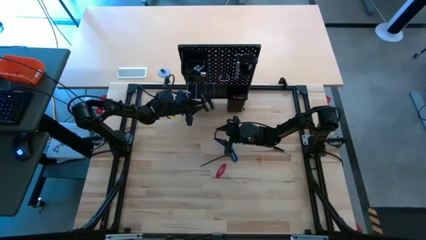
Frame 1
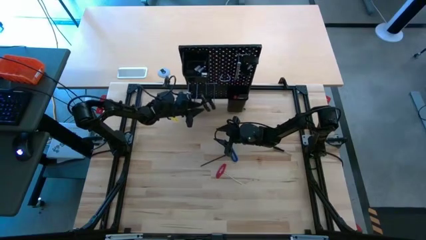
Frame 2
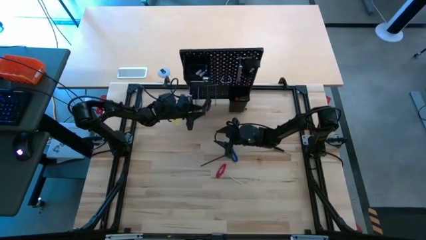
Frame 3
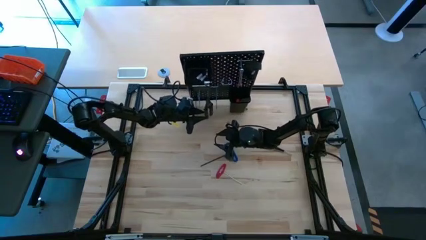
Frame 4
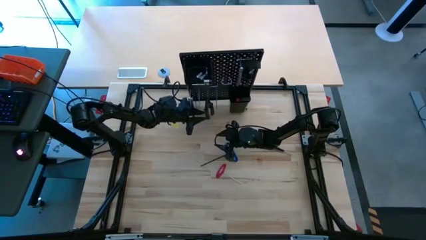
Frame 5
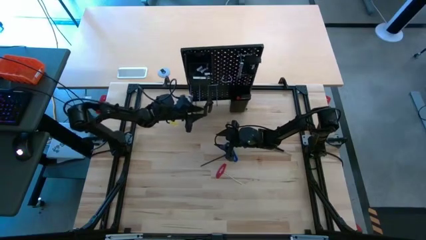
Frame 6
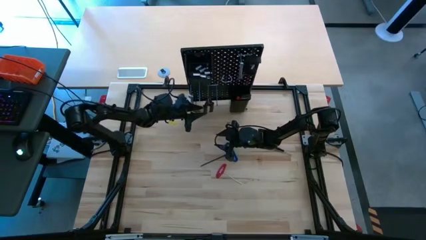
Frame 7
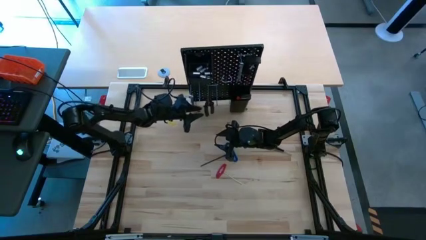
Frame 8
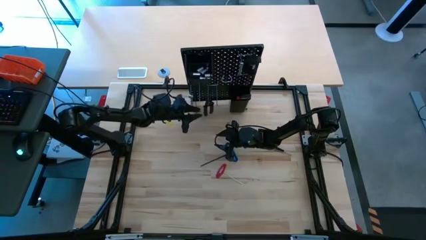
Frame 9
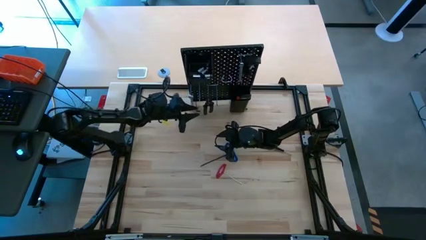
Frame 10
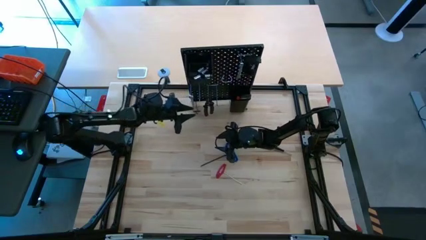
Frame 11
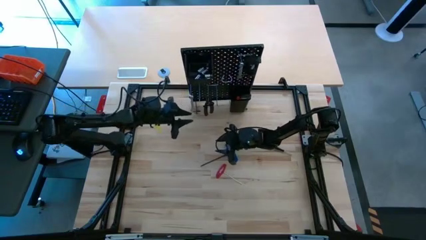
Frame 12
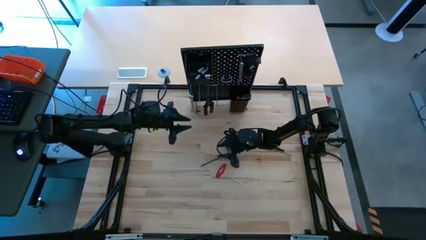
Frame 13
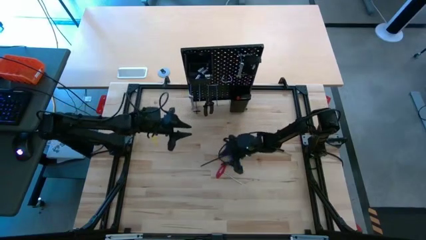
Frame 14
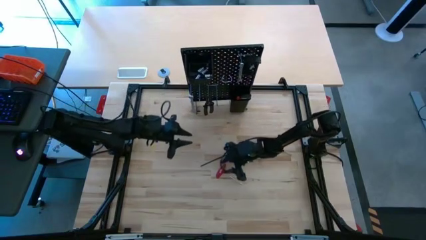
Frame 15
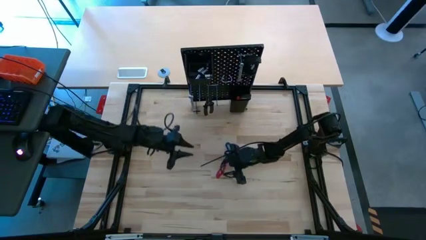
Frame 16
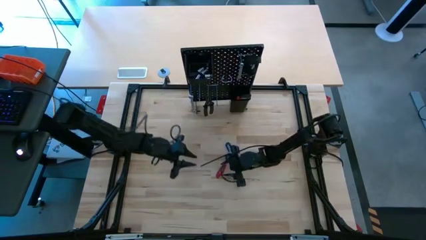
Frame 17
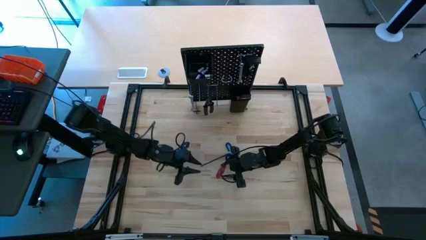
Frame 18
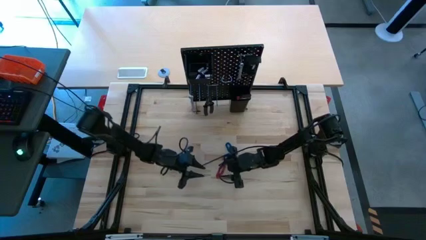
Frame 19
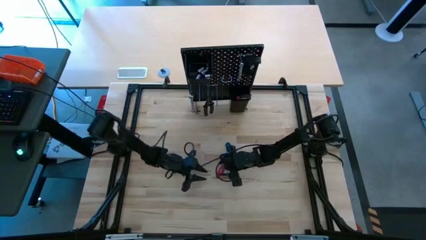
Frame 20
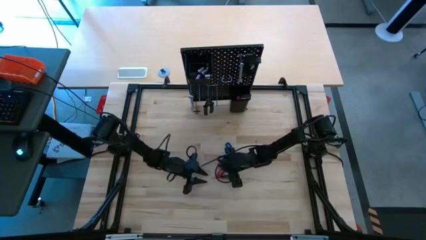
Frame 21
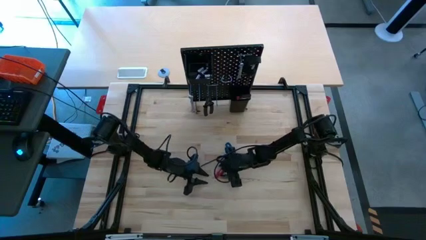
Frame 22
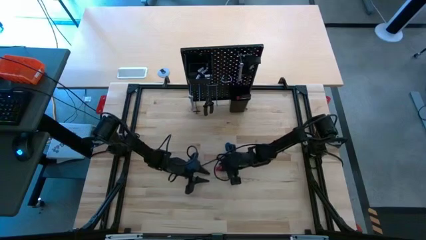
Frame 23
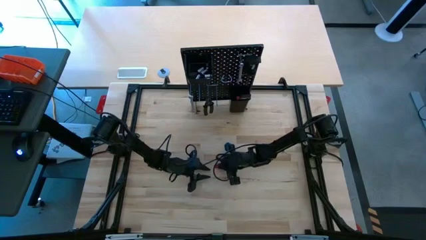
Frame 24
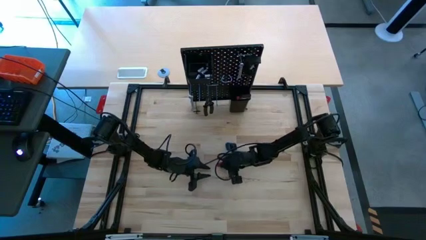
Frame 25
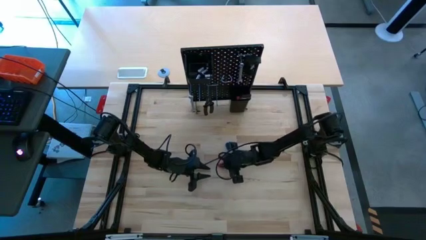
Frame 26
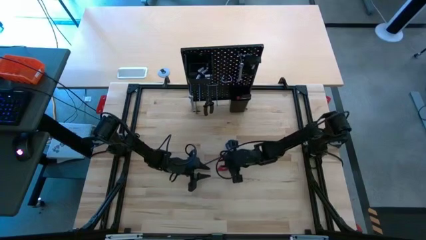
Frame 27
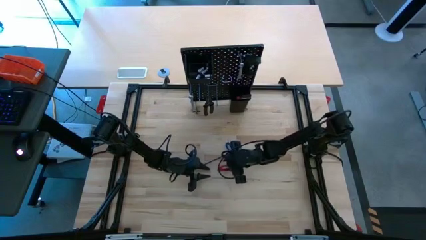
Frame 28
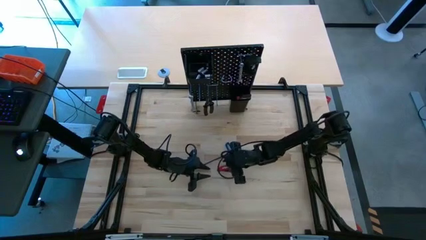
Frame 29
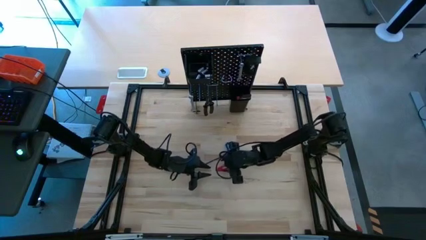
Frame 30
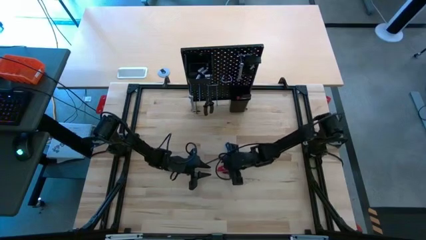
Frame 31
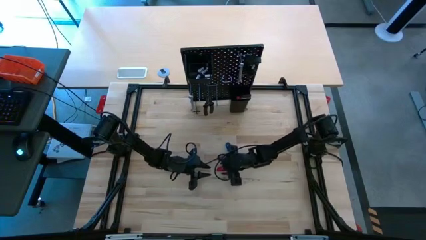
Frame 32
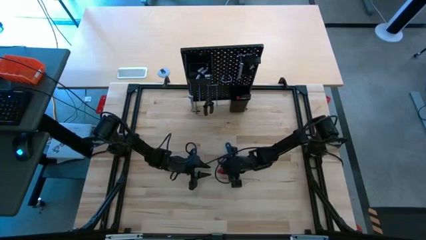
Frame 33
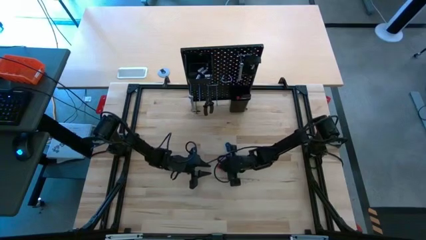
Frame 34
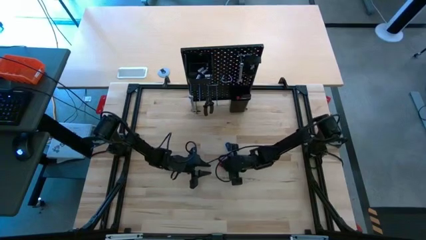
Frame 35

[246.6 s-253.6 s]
Task: Hang tools onto peg board
Hang the allen wrench on the pegboard
